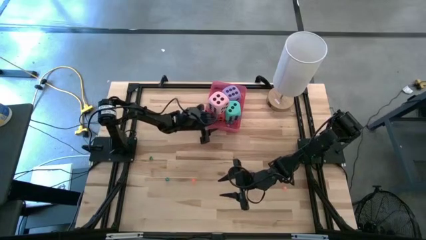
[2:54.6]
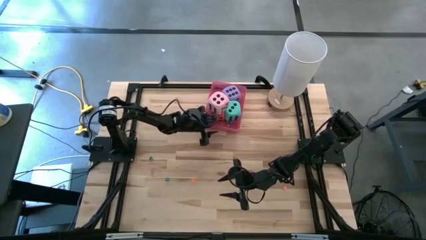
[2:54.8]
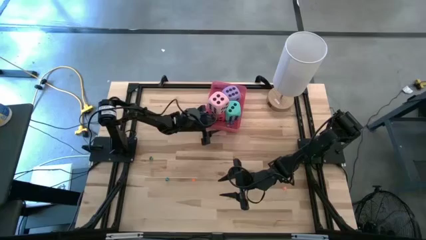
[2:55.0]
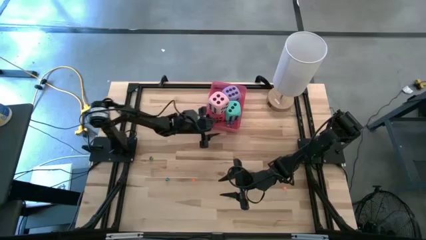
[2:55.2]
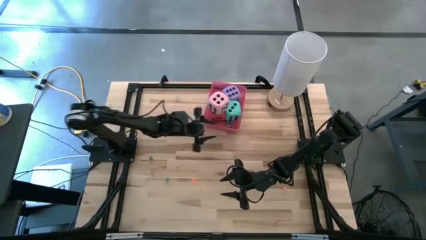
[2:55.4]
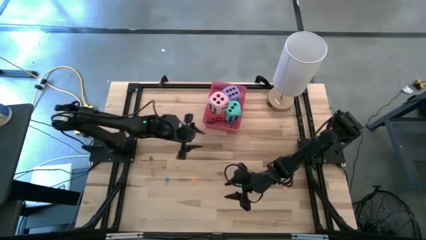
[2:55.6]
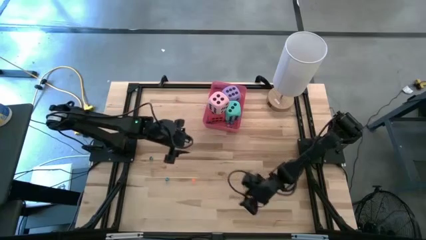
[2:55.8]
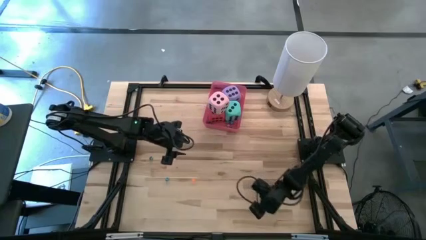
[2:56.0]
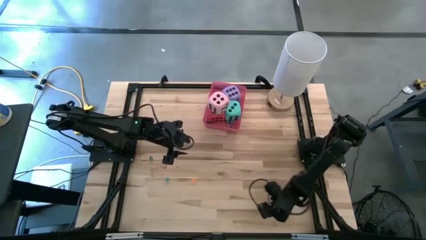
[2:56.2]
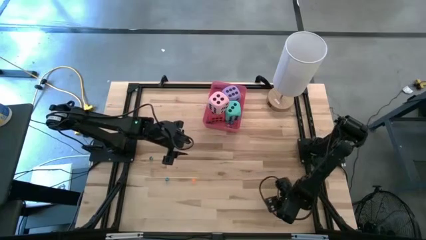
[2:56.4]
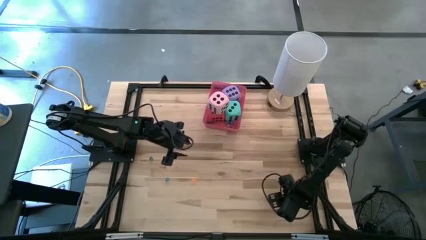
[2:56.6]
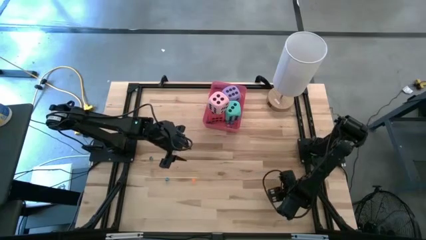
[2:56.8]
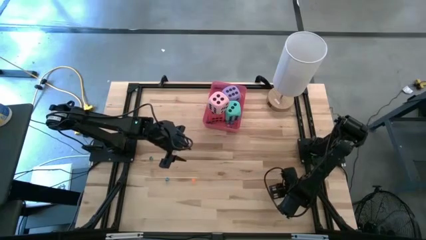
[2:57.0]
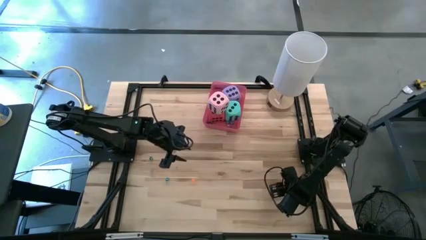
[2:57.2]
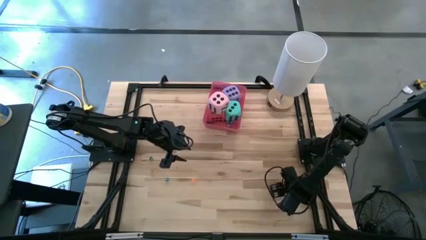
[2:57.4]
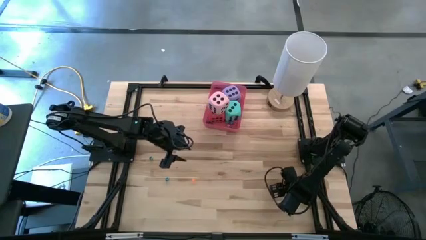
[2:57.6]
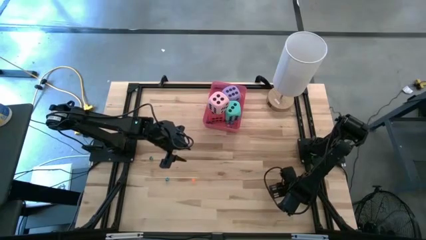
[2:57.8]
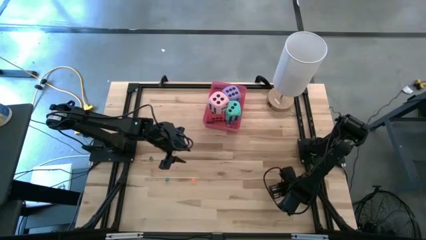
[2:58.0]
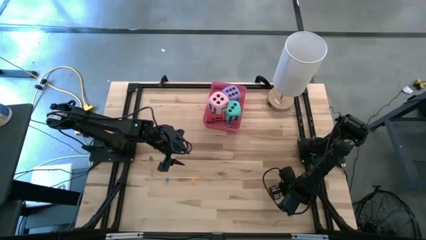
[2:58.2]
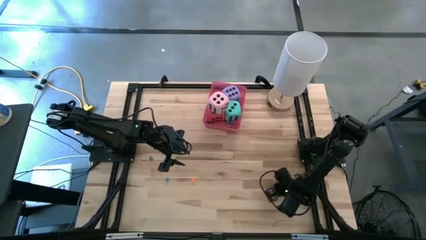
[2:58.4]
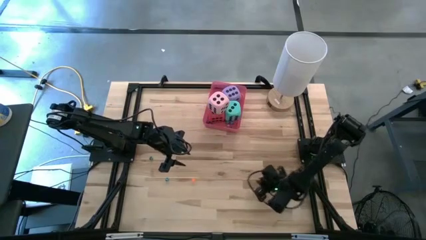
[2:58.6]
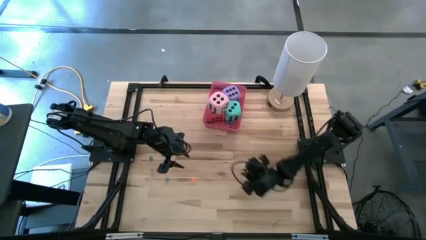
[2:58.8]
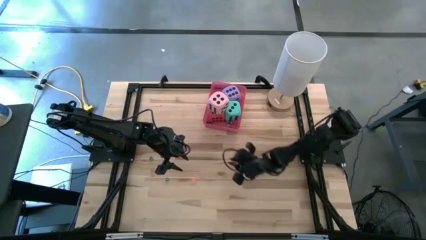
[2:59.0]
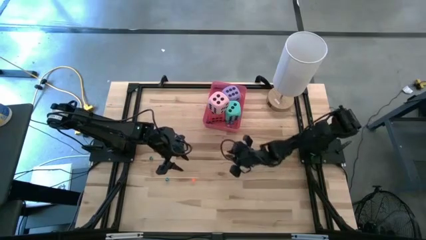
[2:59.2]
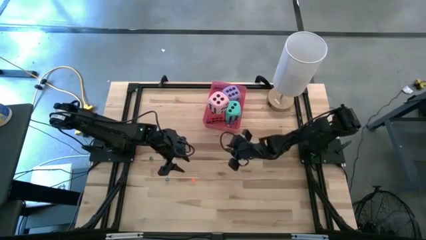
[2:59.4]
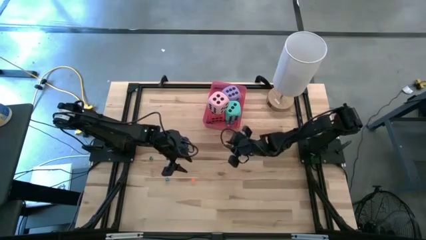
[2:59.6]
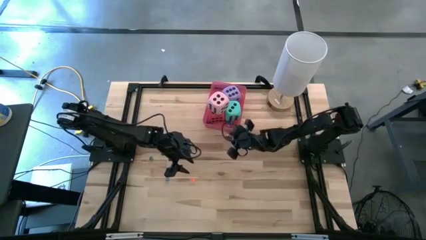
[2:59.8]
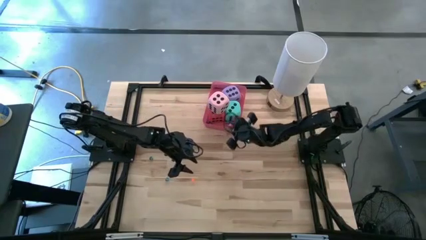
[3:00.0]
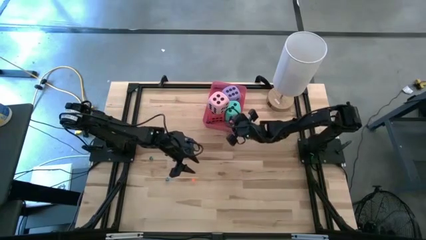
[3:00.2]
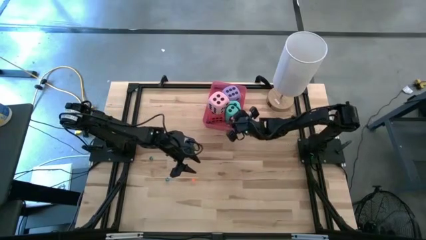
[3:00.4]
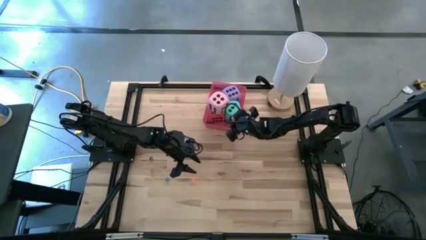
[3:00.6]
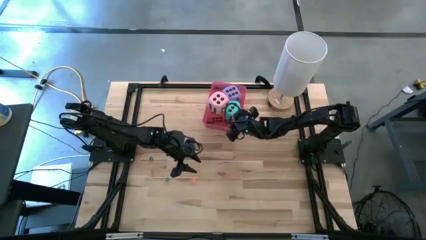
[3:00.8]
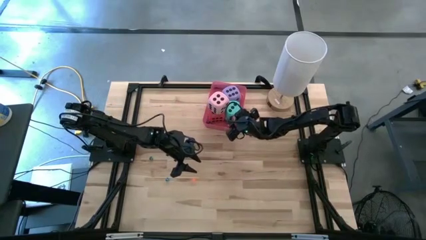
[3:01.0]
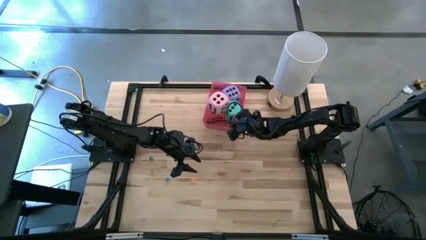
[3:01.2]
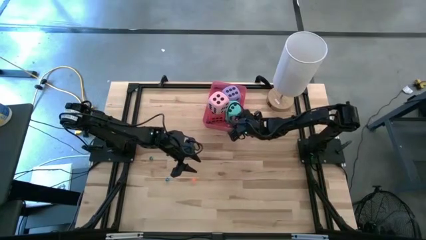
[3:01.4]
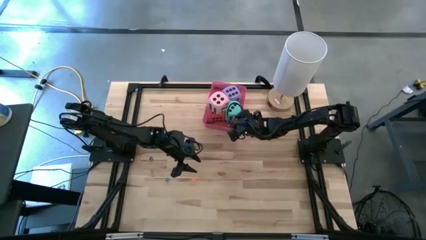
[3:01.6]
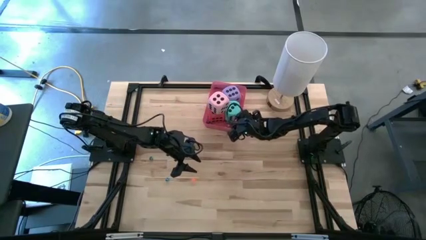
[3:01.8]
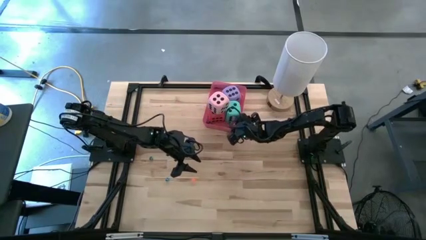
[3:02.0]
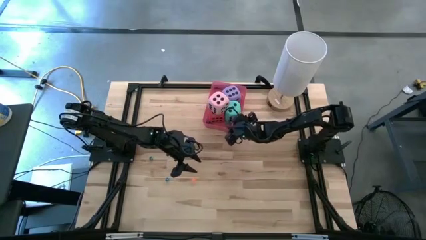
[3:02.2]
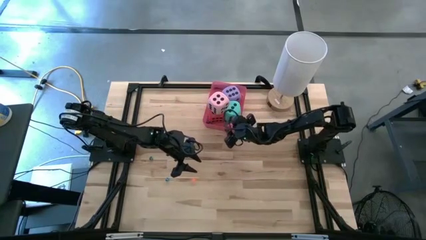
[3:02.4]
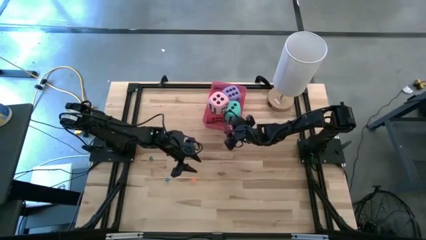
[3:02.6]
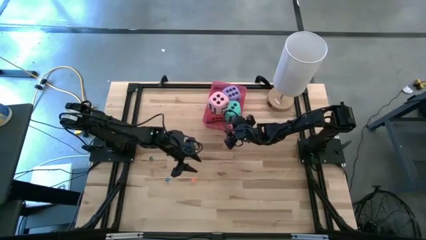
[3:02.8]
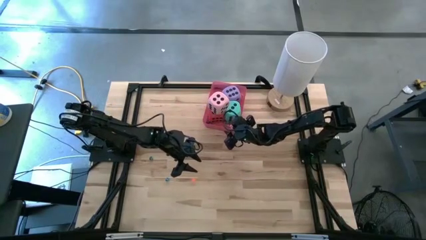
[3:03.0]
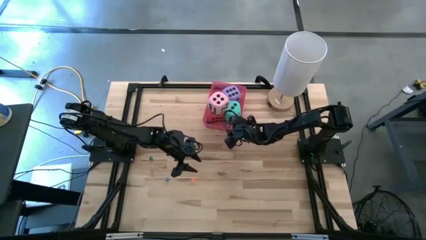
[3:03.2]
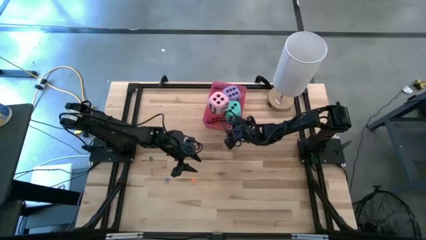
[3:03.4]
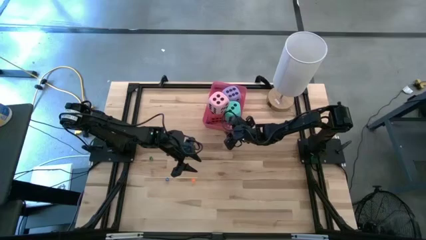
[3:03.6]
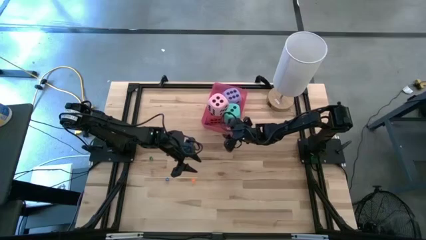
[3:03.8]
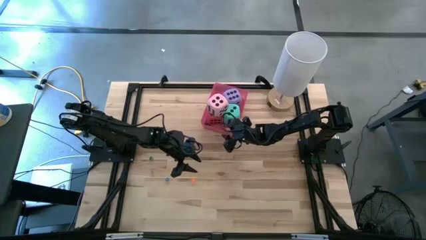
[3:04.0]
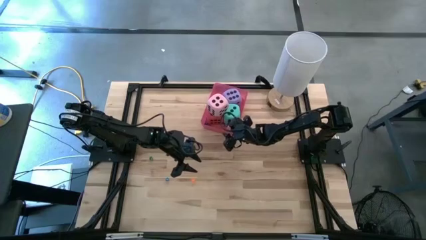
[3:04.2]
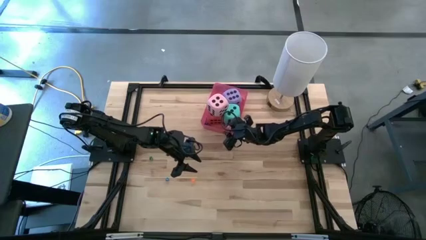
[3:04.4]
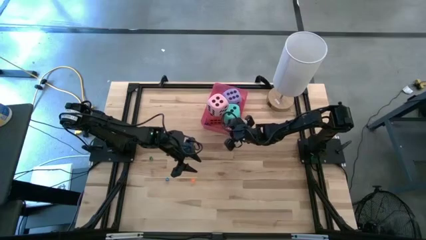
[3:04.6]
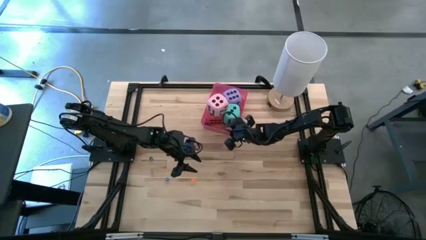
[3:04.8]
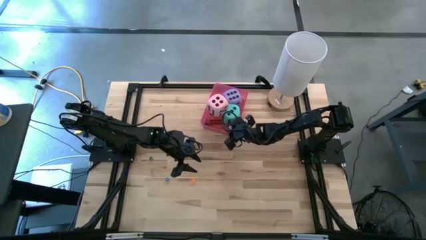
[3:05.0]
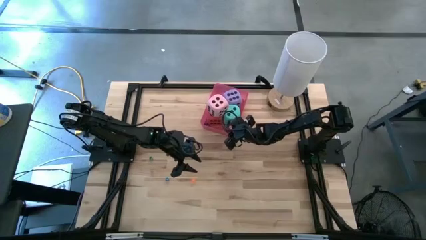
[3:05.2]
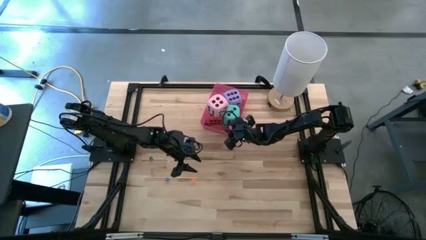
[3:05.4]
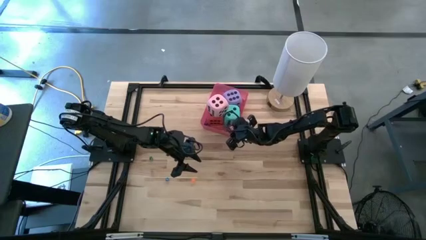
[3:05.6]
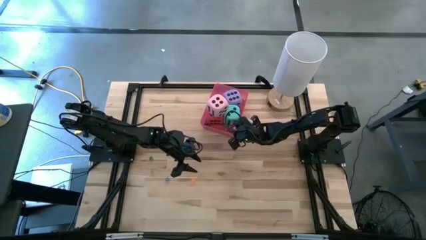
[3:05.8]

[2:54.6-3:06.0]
Task: Pick & Place Dice
Put the right small orange dice into the bin

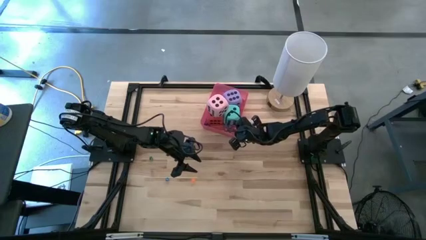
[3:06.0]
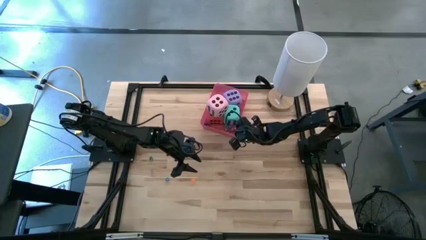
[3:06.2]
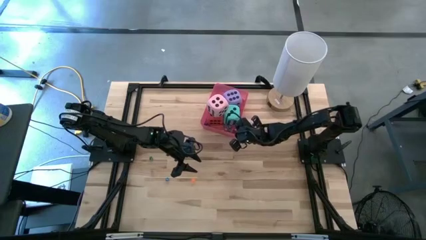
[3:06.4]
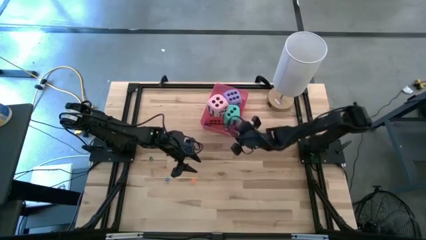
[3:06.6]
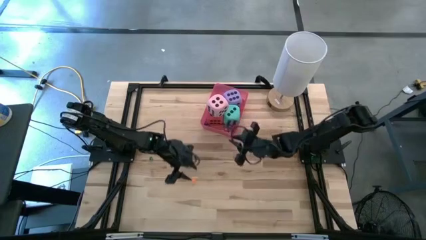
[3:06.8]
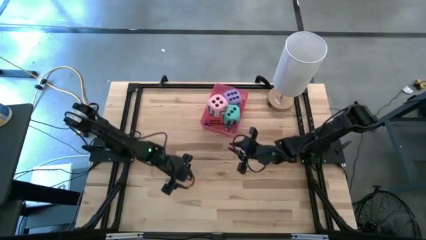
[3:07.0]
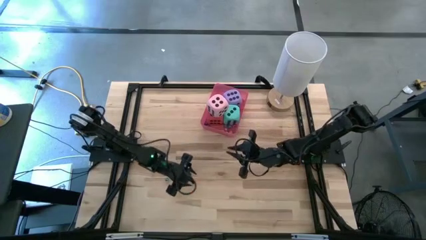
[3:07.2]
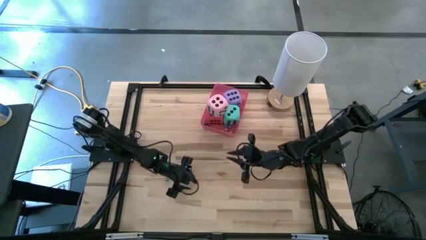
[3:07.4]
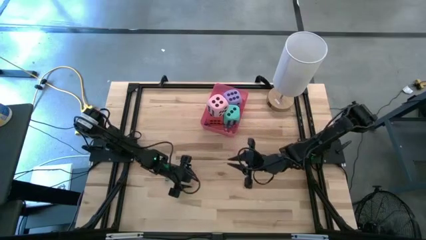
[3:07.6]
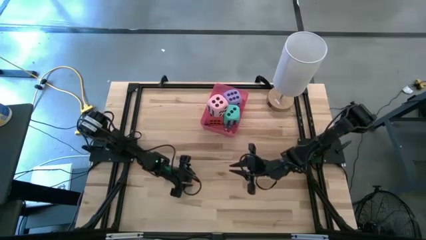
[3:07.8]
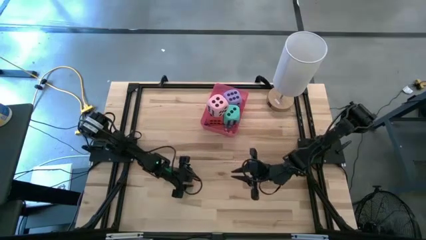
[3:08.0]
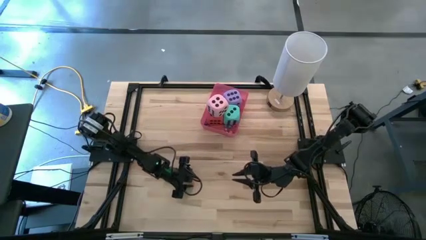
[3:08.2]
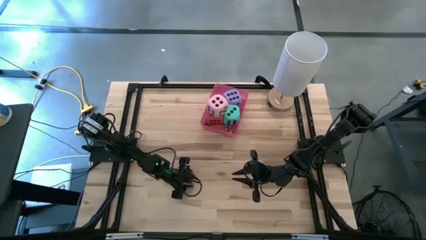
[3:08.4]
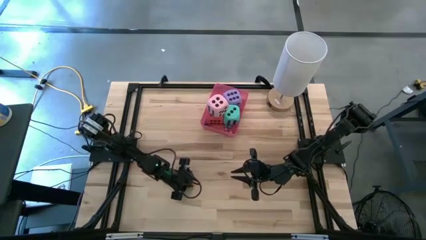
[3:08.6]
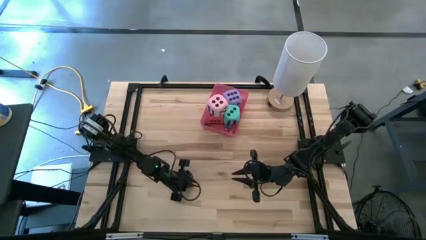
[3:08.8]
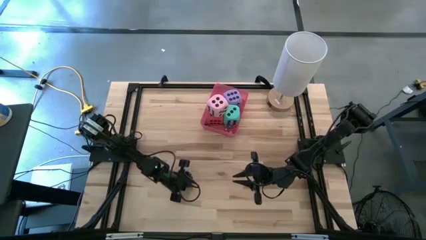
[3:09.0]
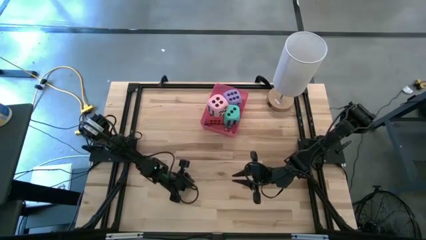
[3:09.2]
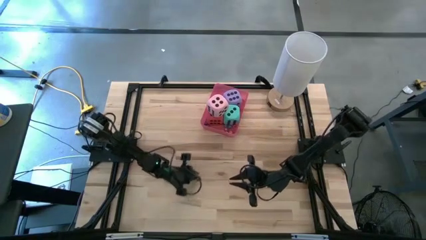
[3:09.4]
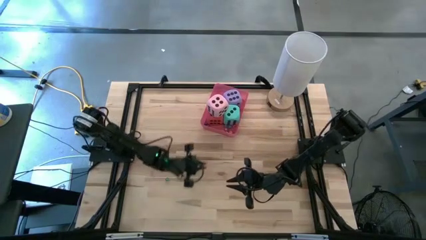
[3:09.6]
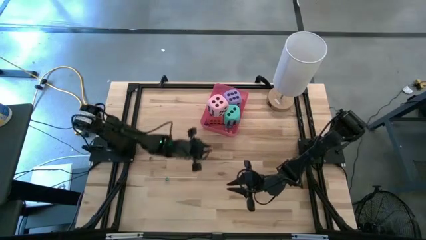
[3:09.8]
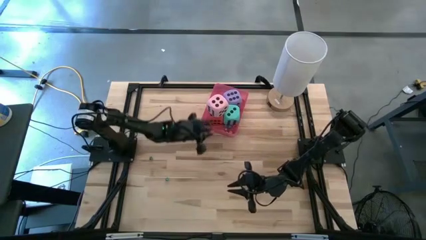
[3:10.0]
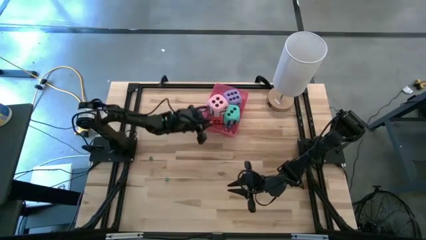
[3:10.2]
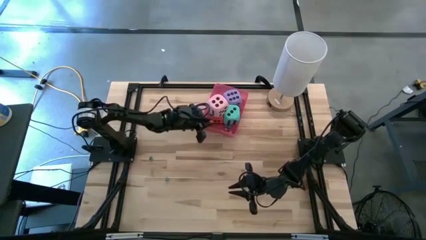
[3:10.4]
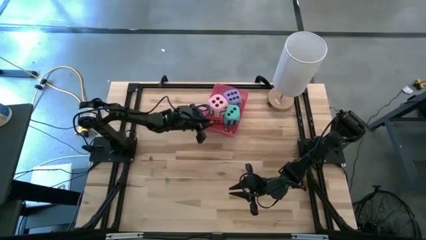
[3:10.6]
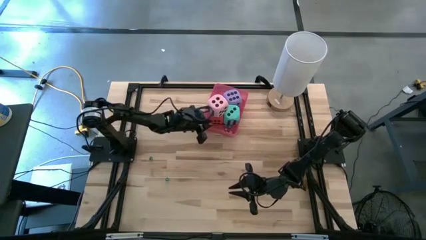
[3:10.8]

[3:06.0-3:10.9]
Put the small orange dice into the bin
